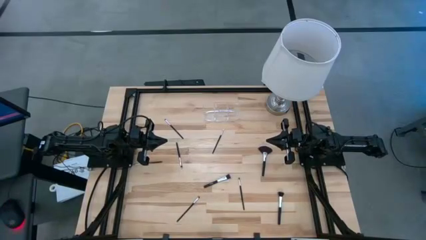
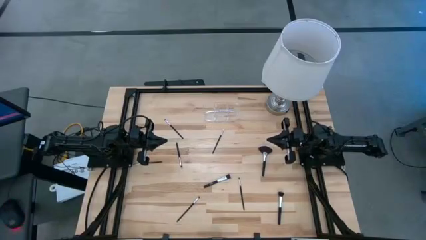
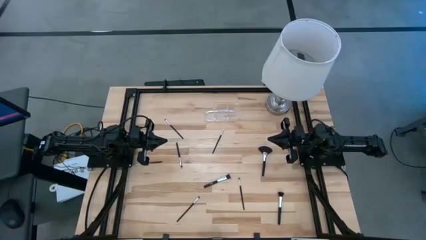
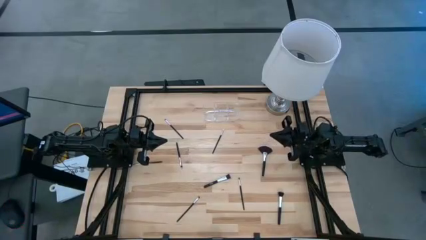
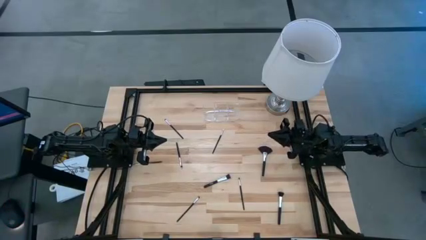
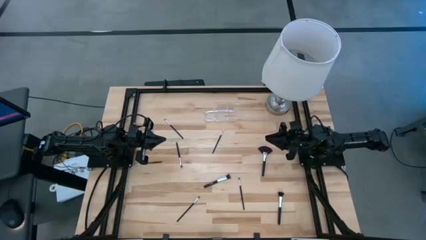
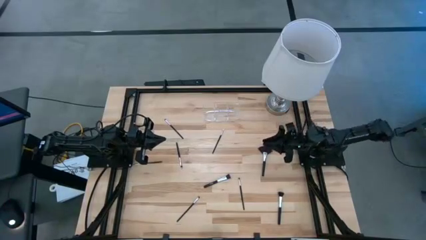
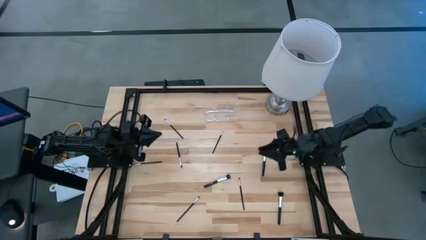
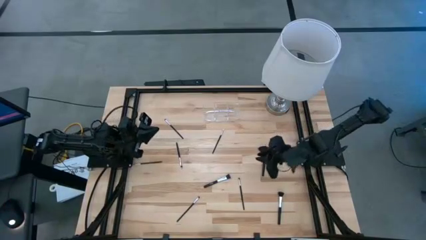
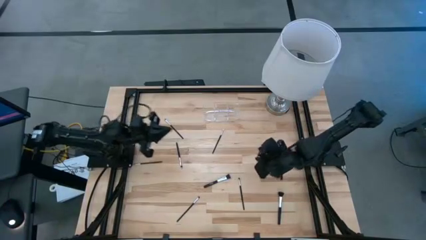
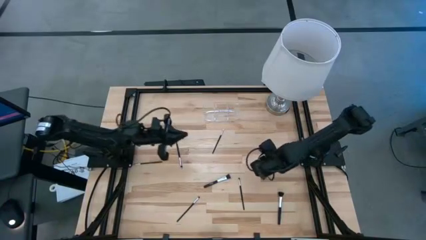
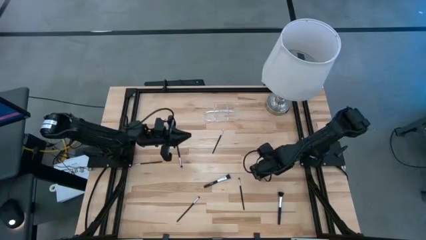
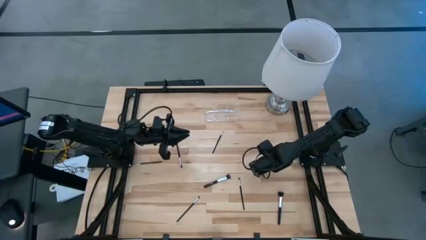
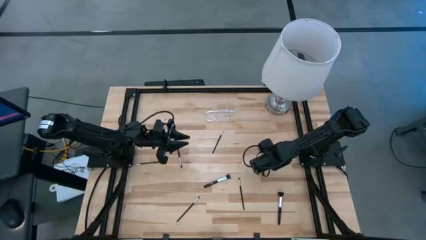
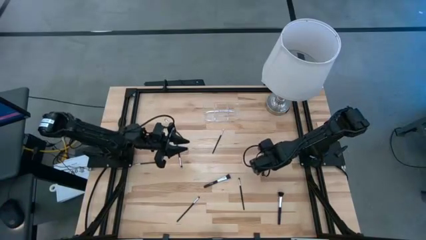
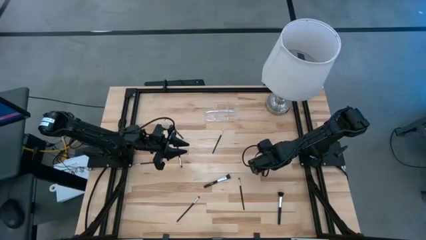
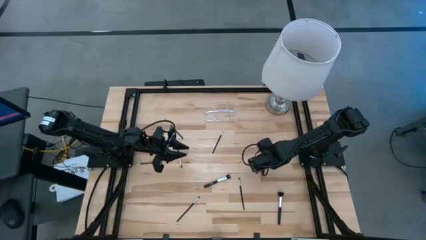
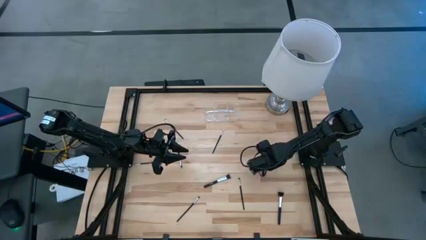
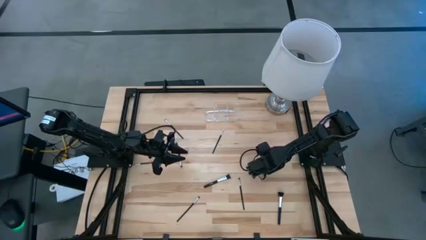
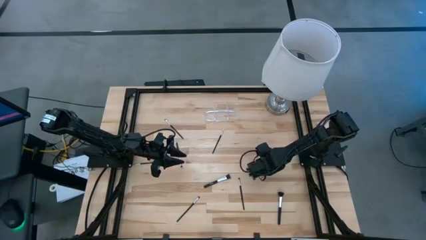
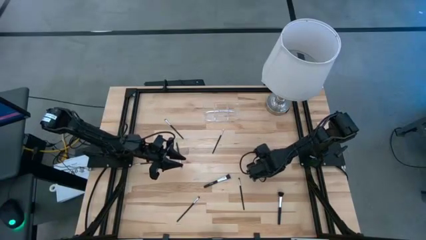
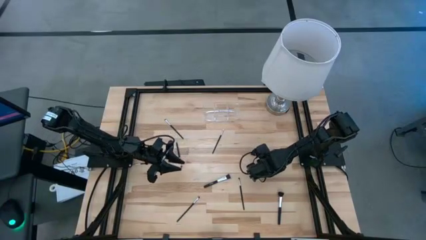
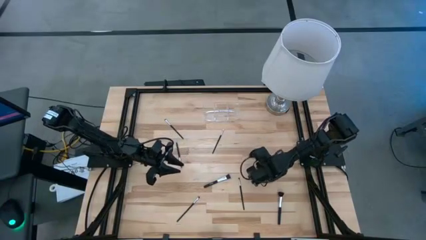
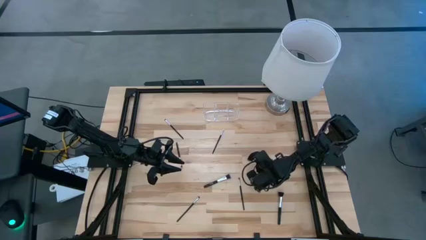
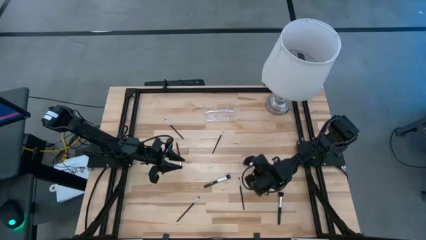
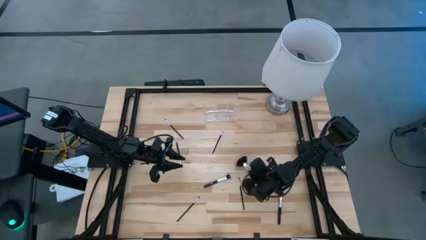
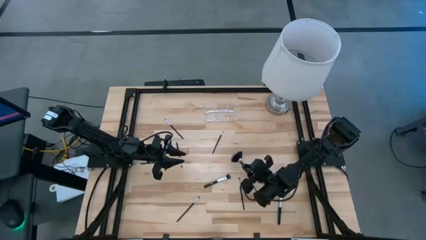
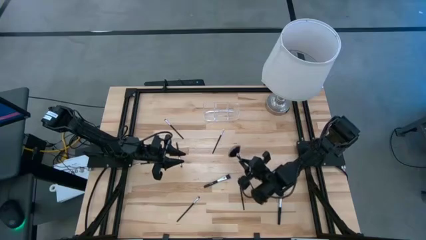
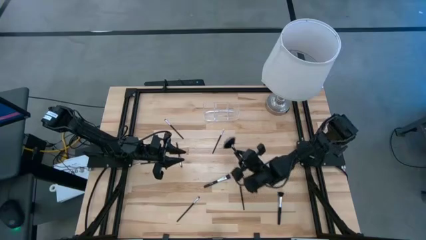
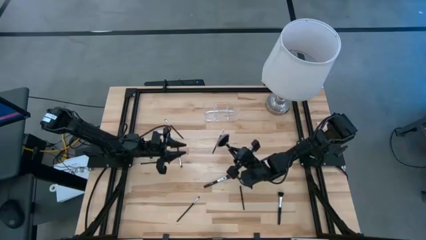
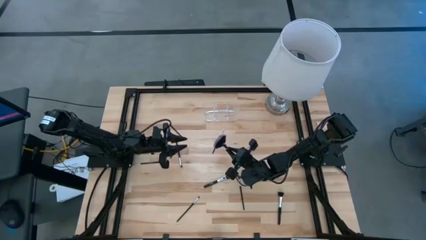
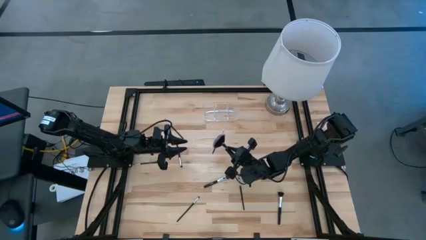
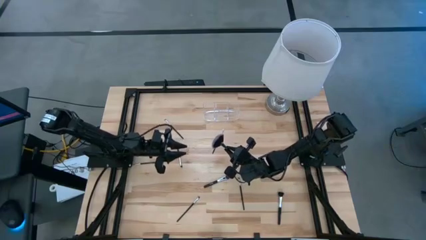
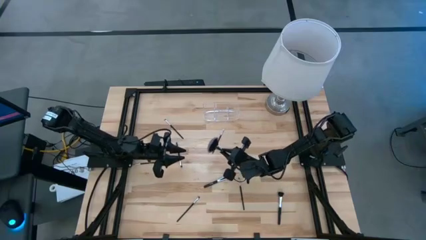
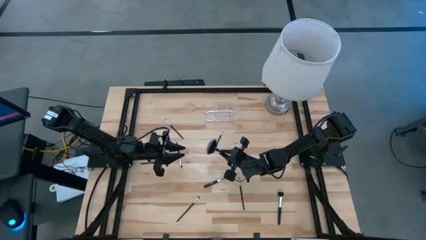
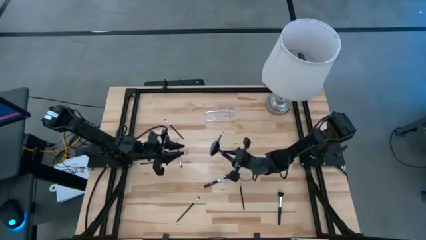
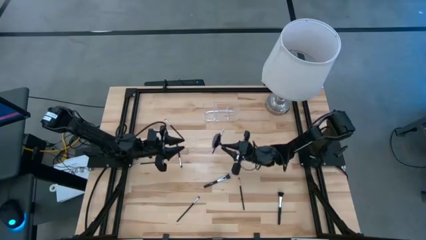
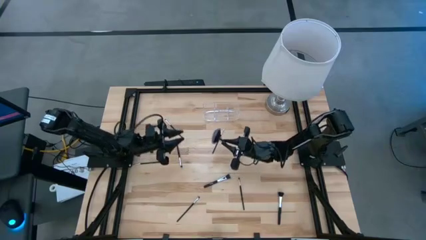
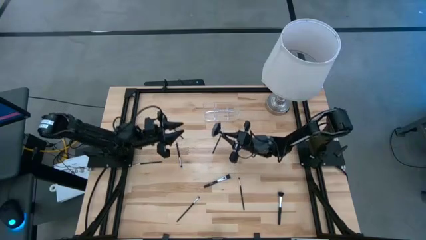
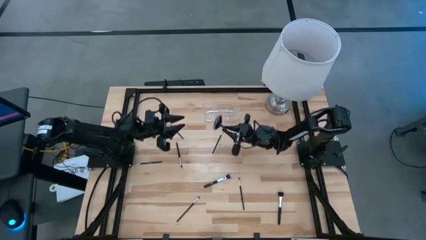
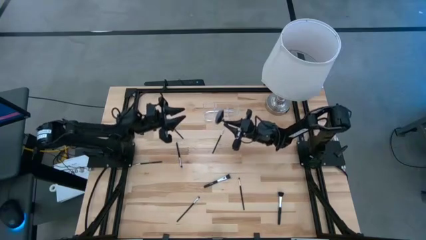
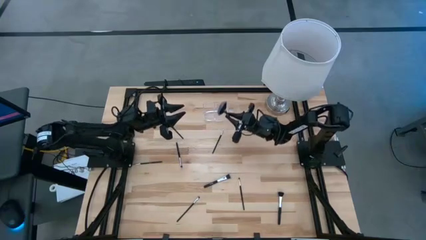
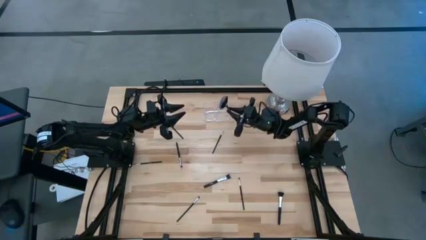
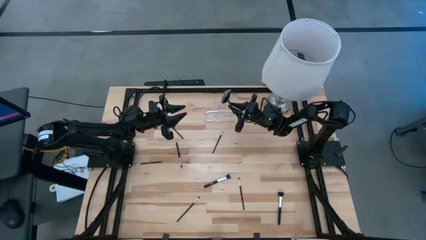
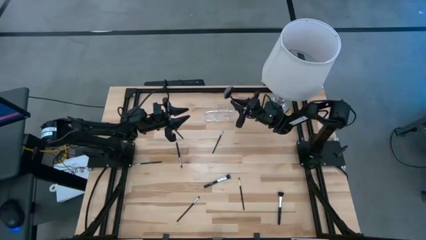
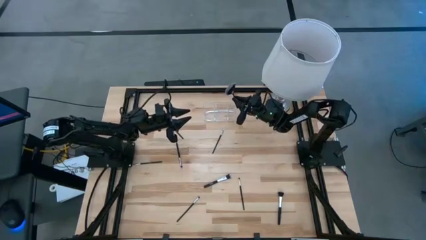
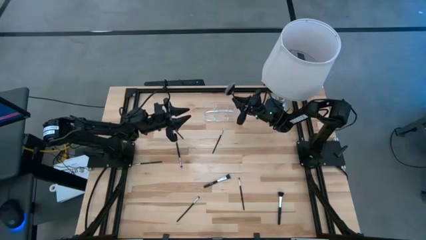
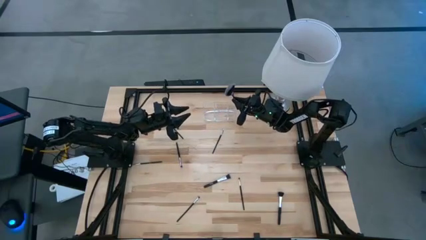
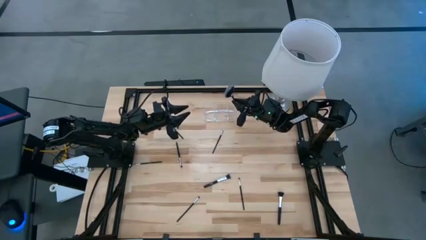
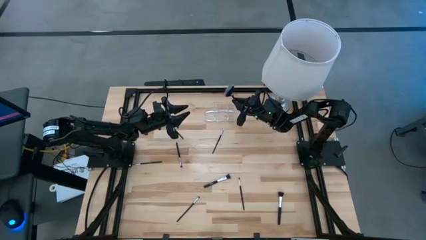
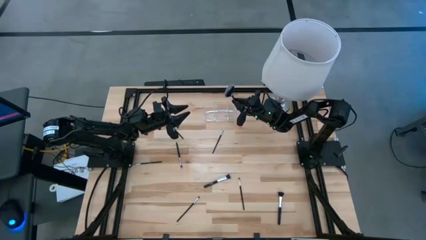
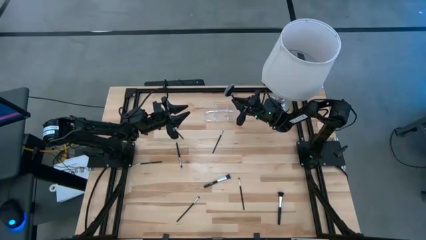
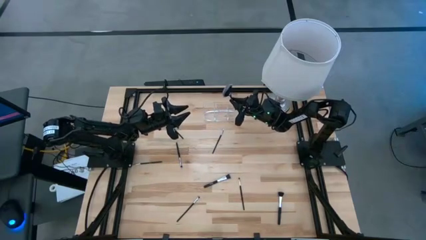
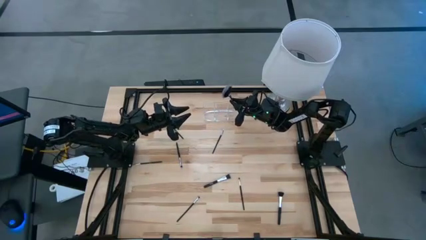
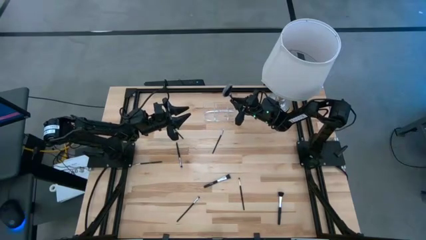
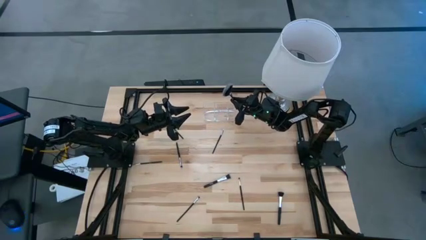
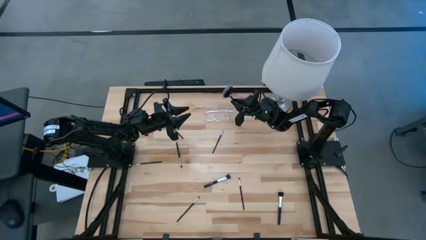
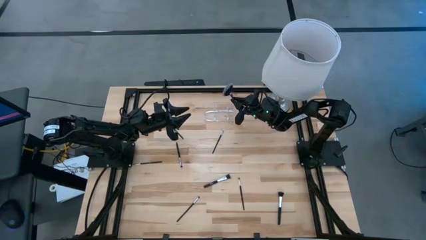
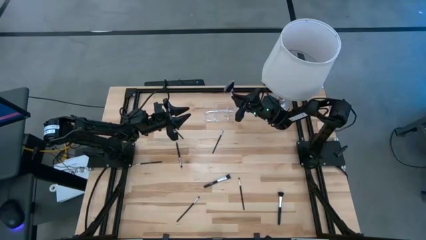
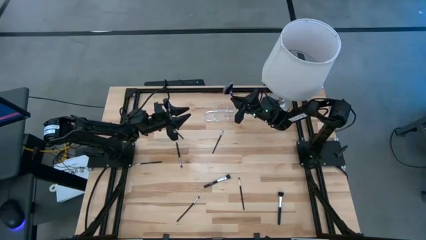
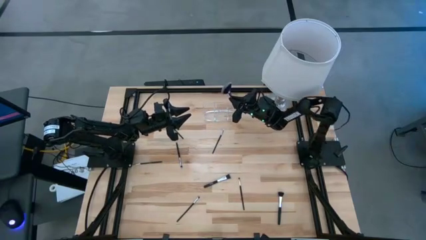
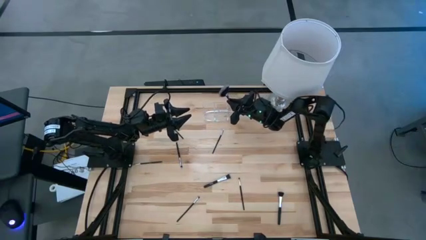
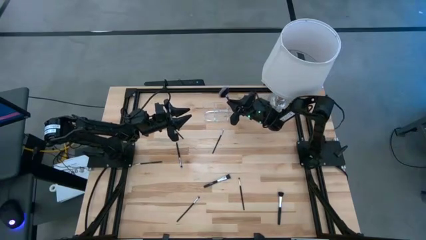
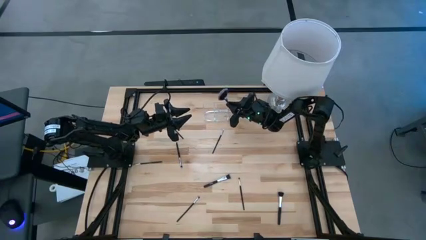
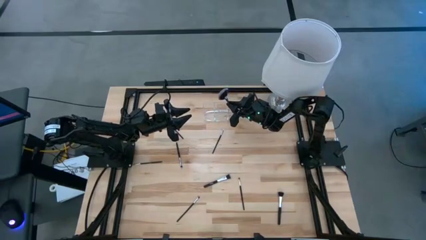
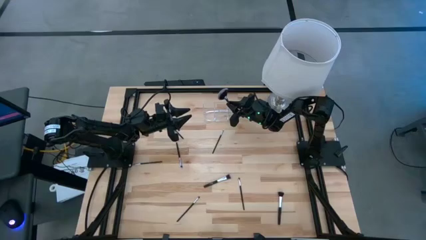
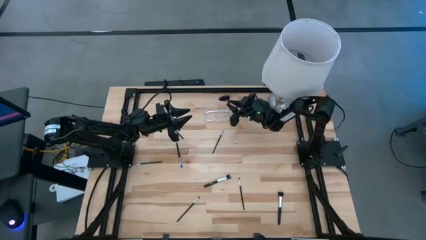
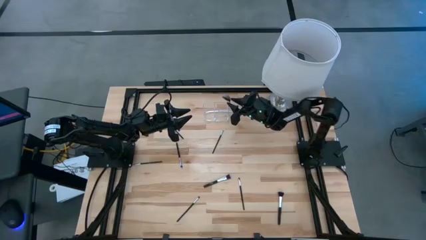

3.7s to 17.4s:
Task: Put items in baskets/containers
Put the silver highlighter brush into the transparent organizer

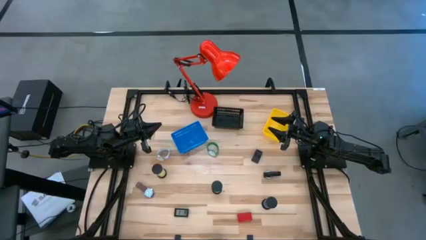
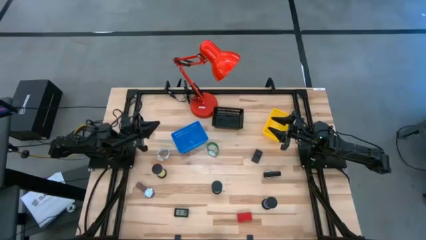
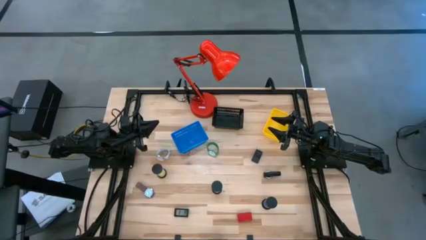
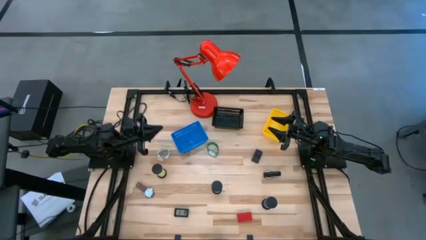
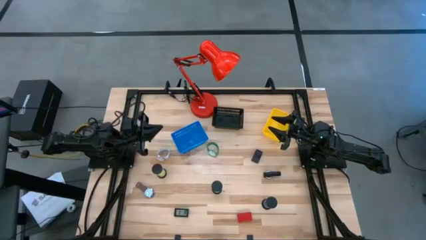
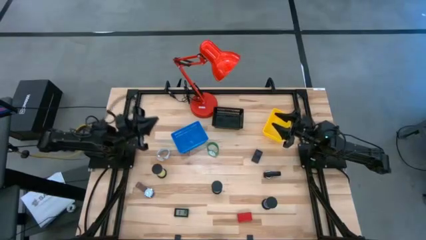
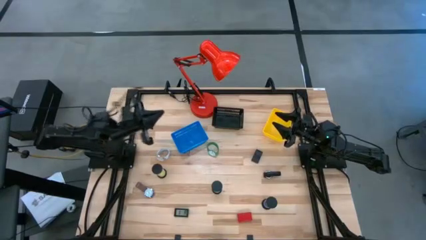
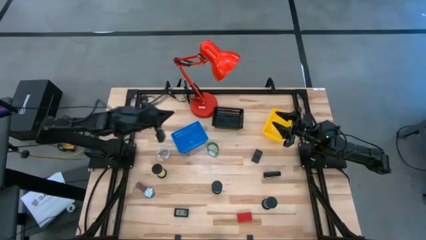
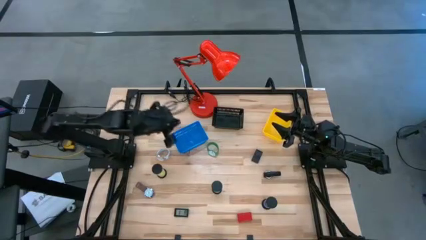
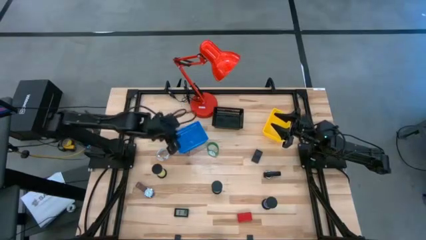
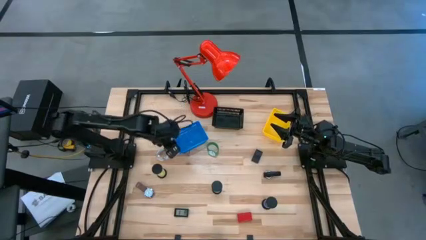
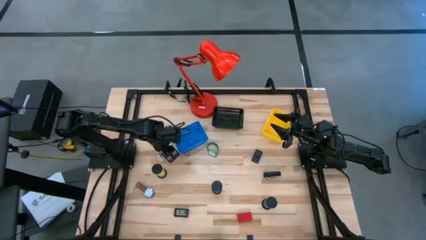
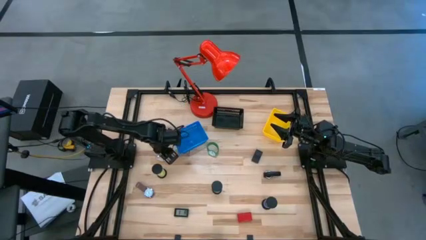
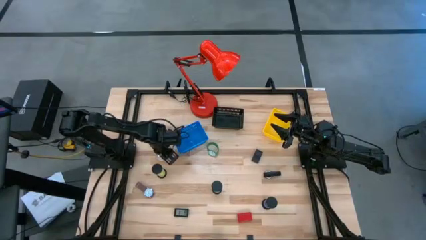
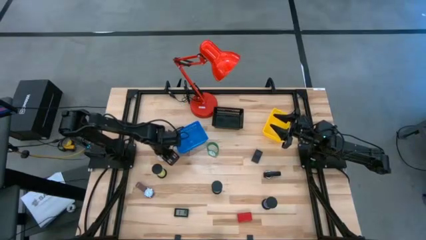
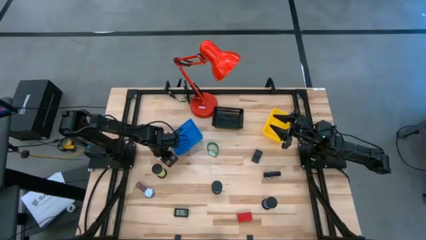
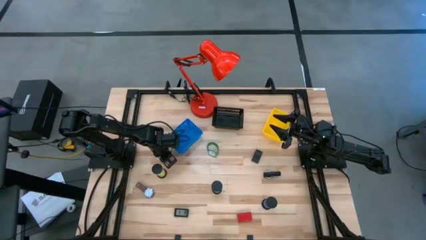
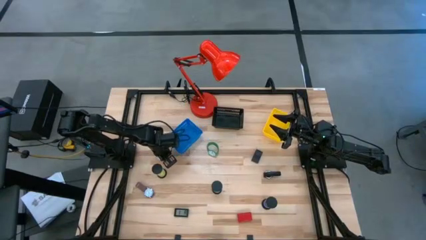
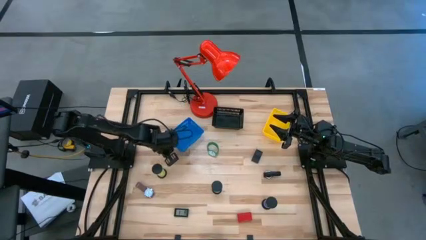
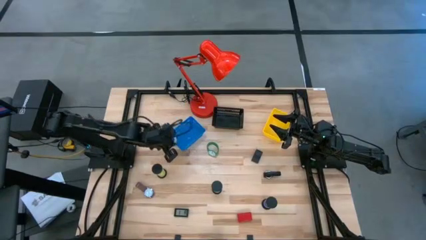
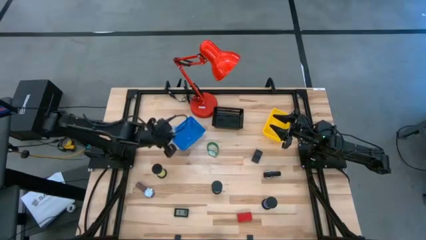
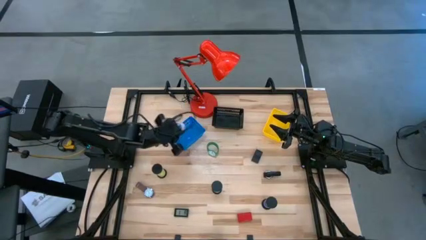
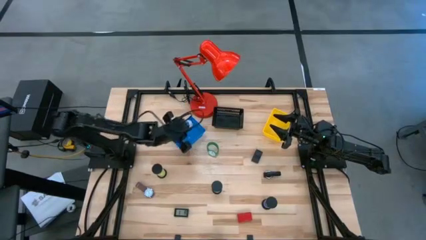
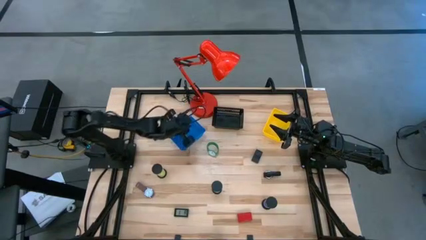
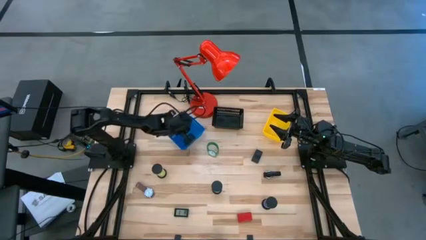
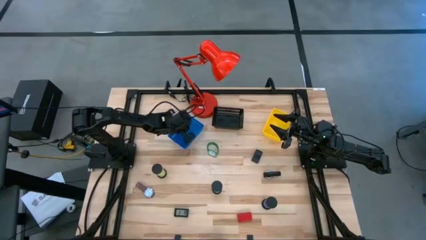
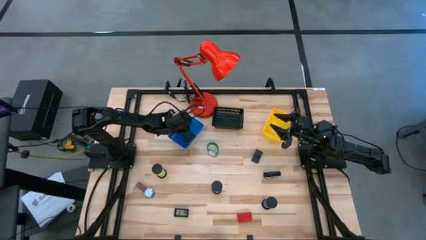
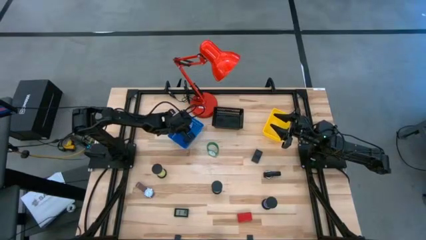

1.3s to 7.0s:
Task: Pick & Place Office items
Put the white watch into the blue bin
